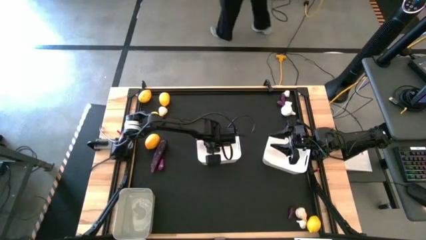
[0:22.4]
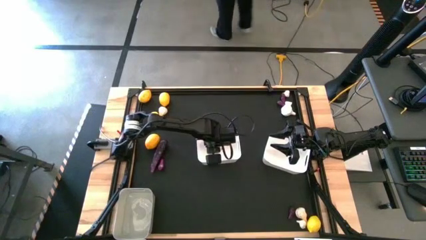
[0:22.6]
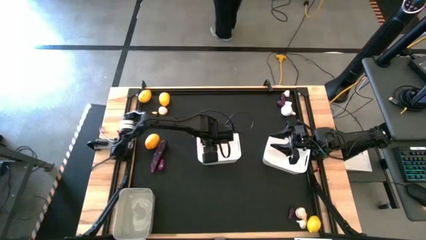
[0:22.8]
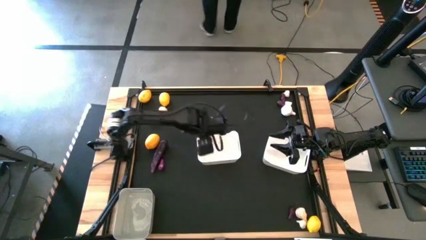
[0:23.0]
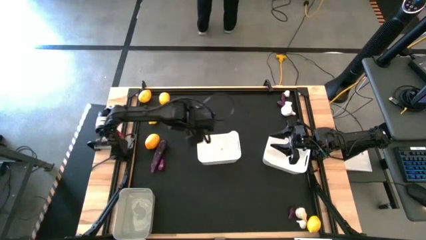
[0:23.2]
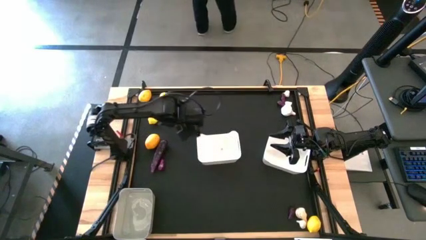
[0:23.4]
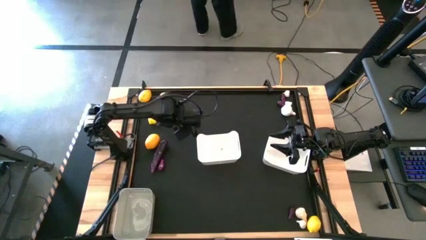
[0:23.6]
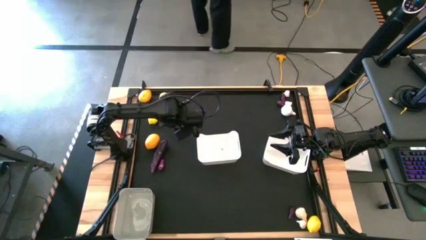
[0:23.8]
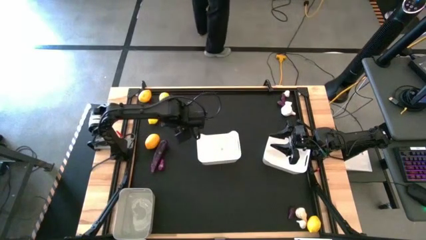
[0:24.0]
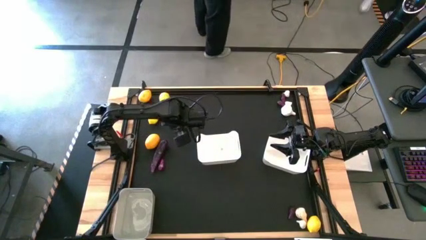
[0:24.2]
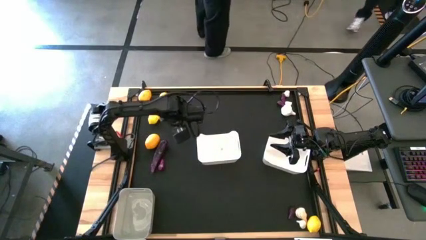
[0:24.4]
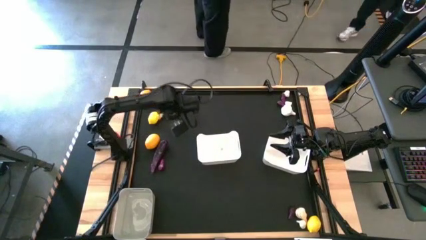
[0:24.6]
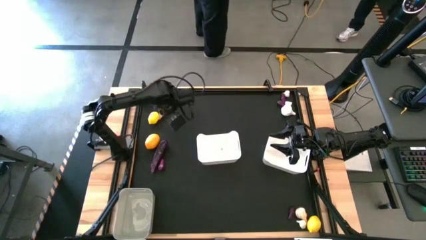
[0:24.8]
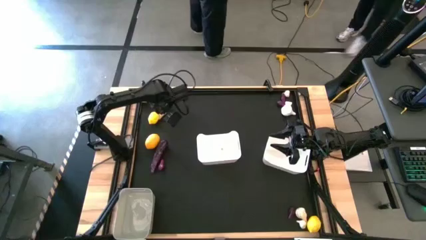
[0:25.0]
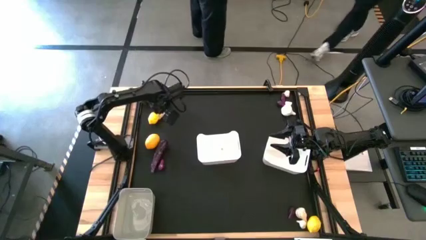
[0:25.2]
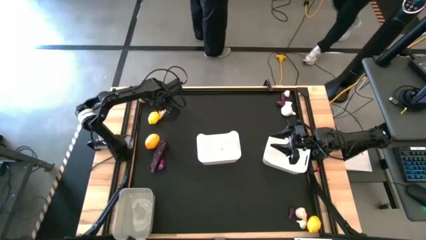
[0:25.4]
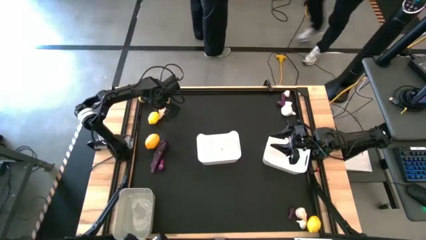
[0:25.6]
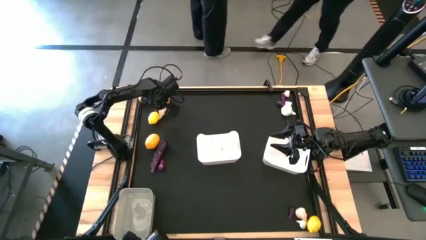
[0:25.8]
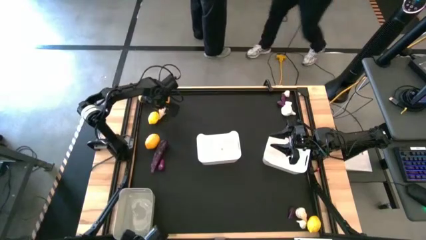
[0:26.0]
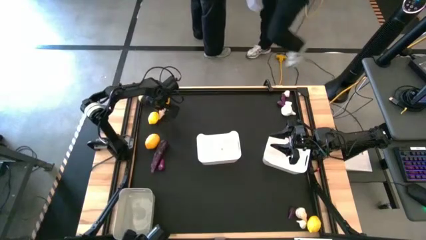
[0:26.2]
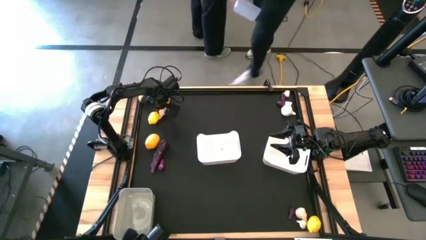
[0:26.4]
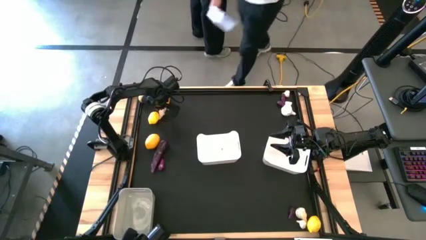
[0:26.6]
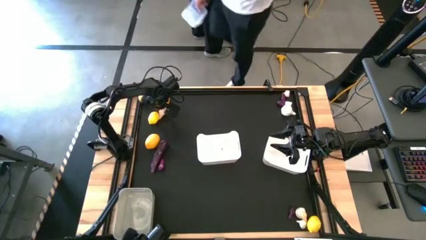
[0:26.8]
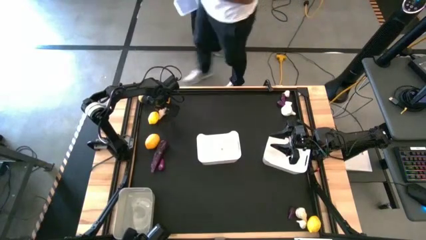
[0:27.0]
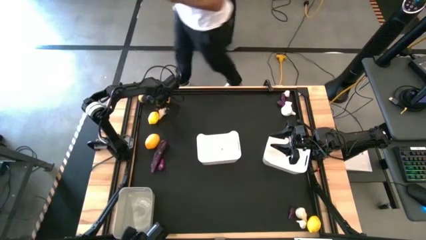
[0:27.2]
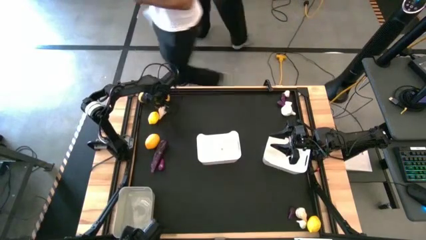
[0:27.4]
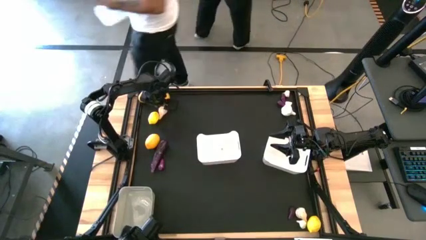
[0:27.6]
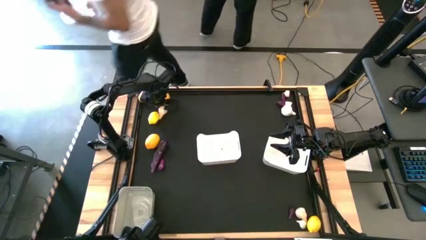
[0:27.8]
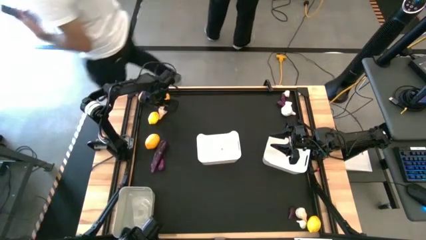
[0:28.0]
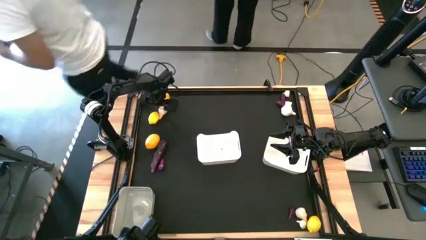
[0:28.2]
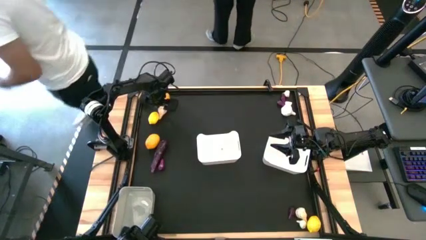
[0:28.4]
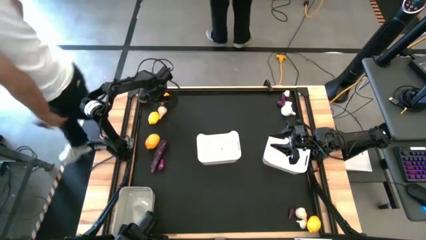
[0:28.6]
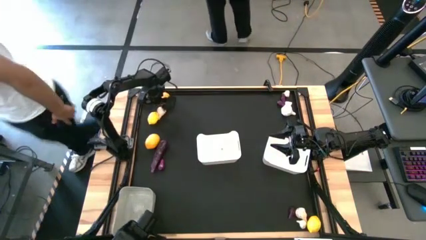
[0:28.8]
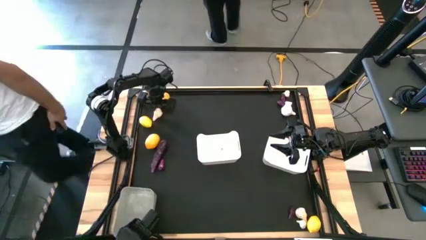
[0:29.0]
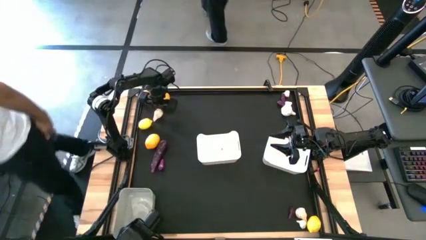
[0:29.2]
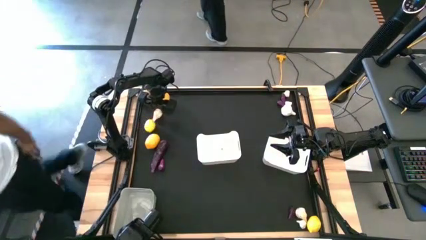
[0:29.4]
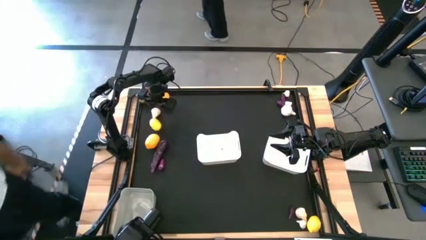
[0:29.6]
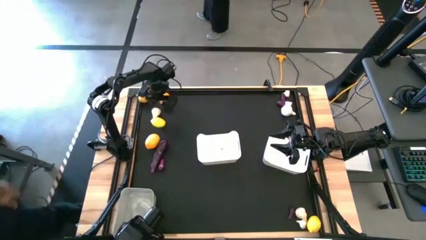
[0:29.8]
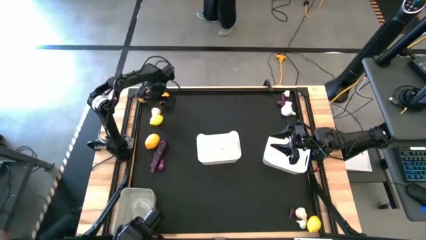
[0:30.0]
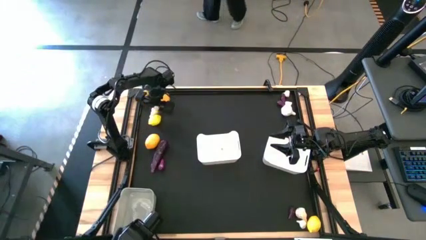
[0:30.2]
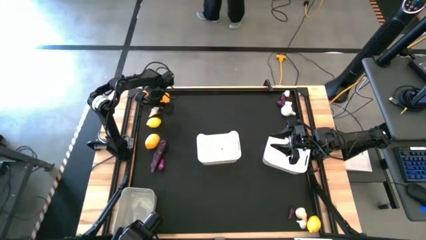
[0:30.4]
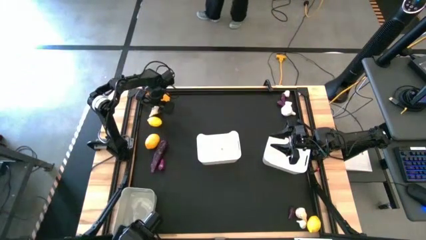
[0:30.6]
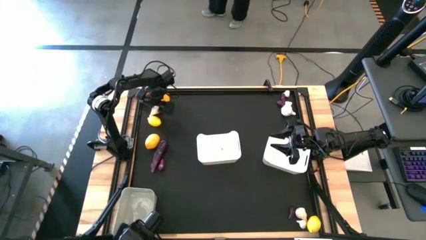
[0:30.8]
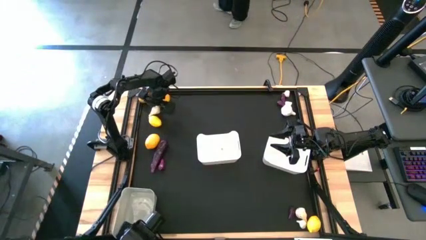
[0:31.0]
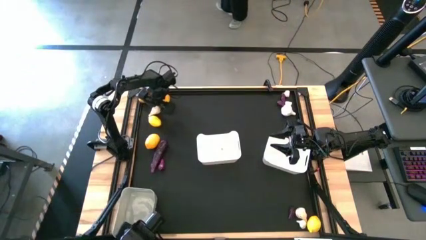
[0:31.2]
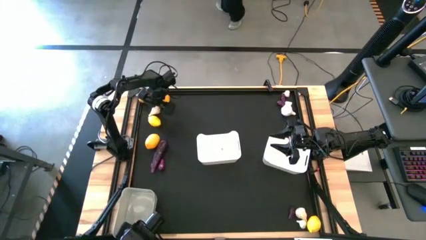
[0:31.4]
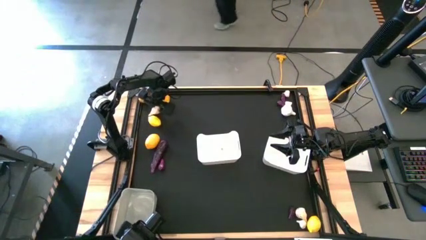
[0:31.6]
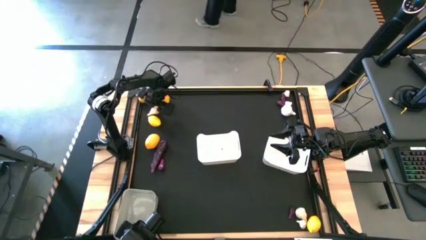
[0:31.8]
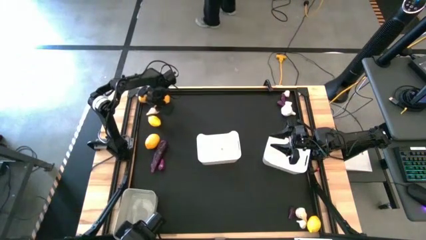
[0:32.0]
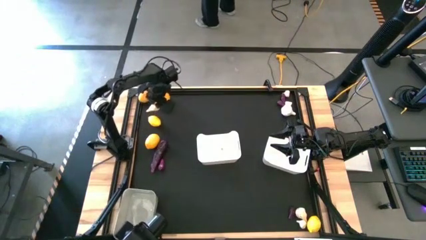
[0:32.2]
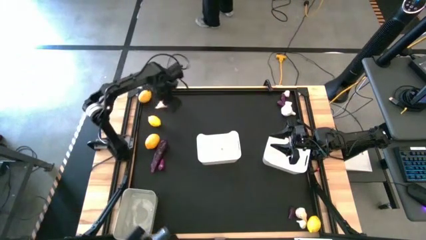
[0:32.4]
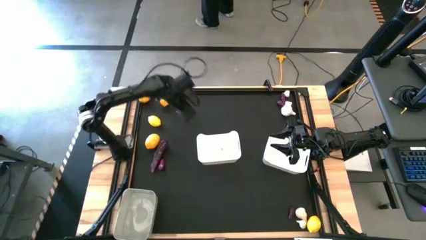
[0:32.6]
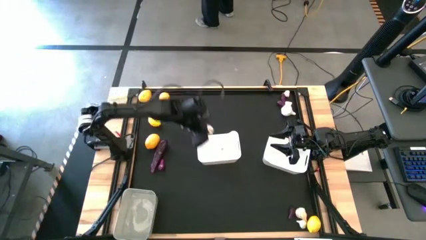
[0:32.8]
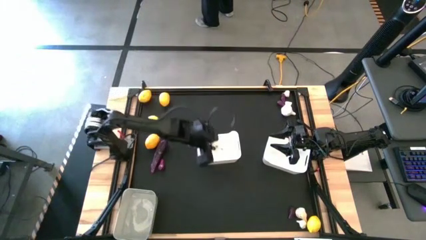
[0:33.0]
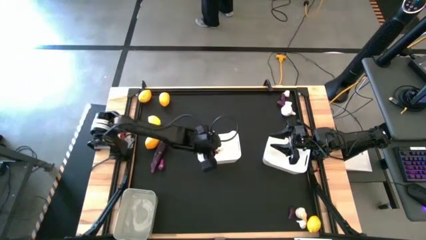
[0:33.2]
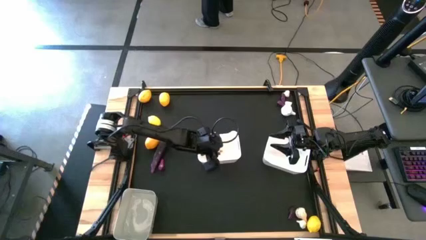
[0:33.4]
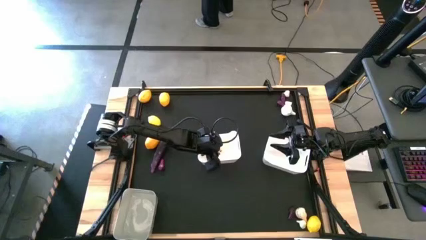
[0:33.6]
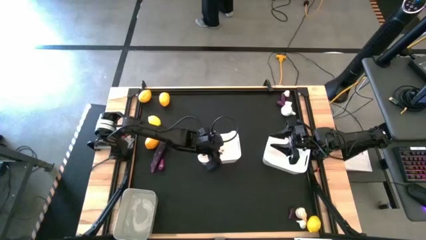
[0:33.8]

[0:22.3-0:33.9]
Task: Sort produce into baskets
Put the garlic into the left white bin

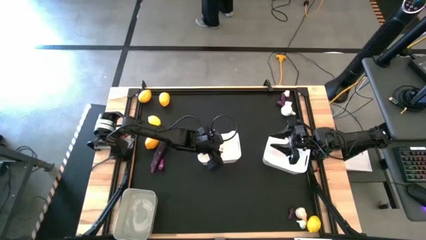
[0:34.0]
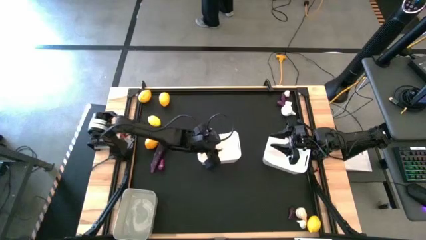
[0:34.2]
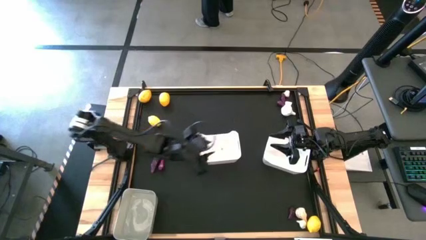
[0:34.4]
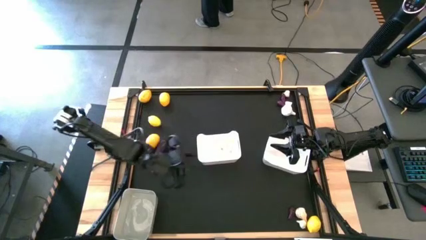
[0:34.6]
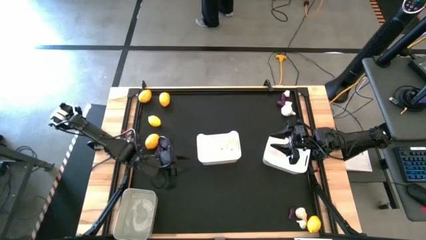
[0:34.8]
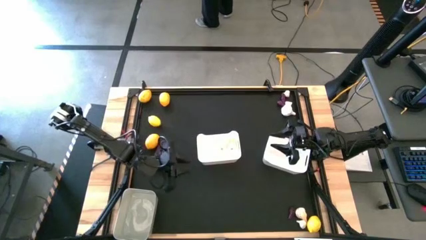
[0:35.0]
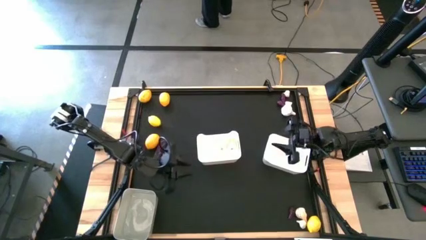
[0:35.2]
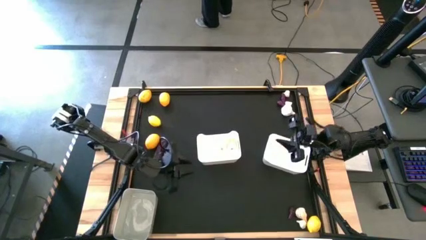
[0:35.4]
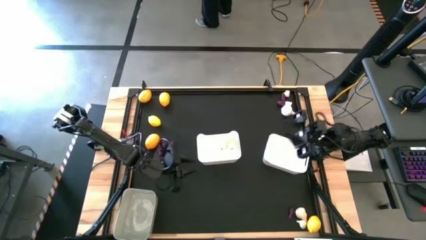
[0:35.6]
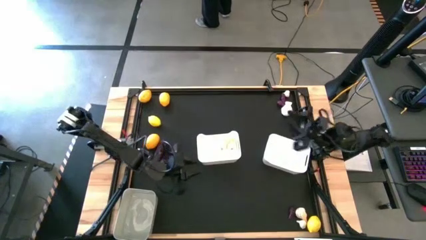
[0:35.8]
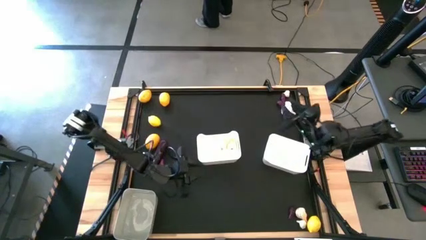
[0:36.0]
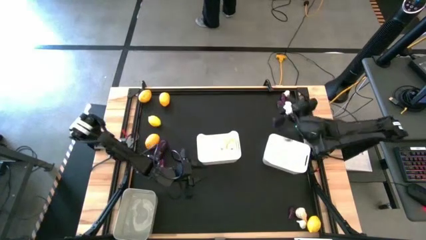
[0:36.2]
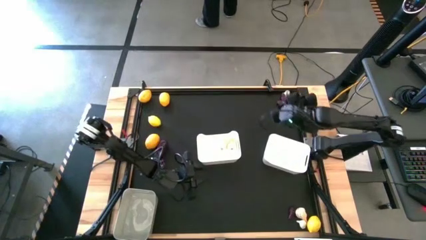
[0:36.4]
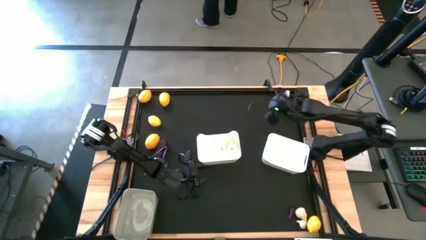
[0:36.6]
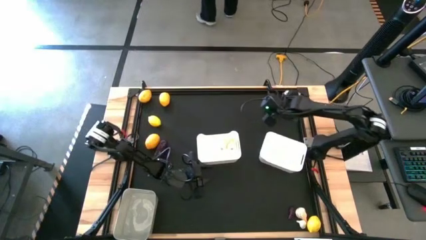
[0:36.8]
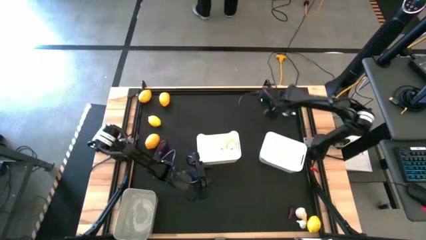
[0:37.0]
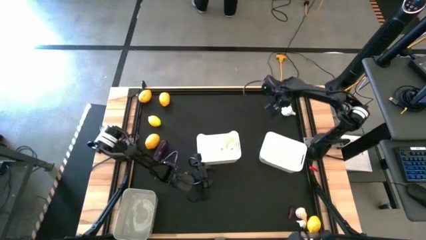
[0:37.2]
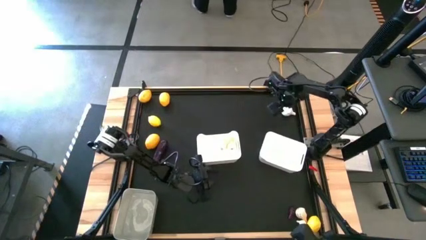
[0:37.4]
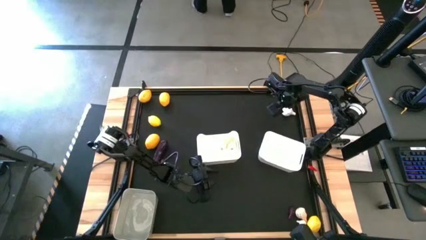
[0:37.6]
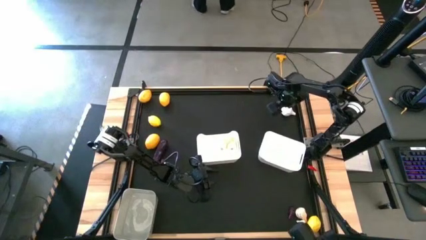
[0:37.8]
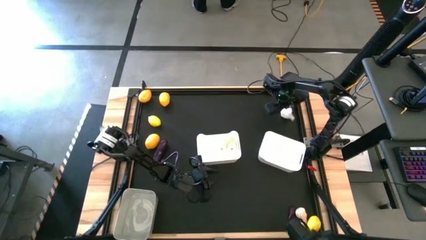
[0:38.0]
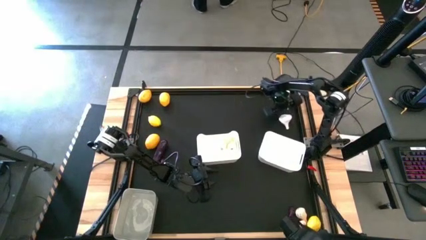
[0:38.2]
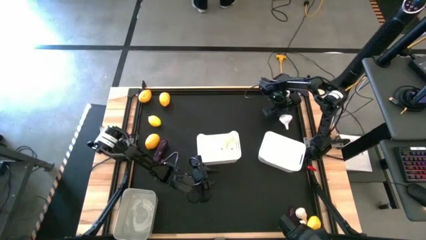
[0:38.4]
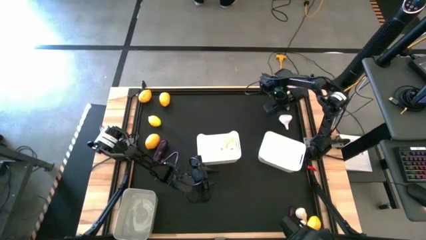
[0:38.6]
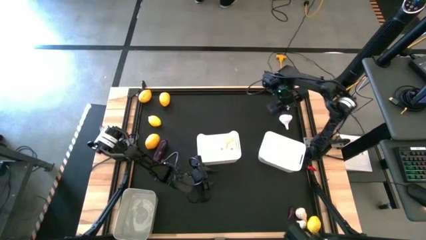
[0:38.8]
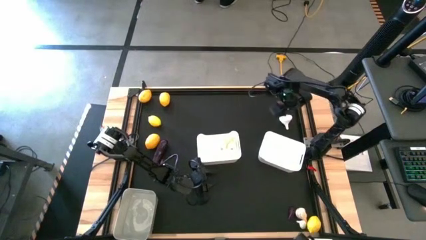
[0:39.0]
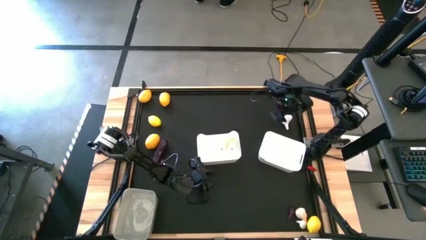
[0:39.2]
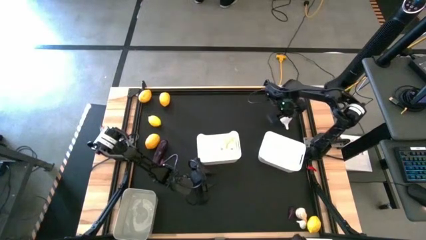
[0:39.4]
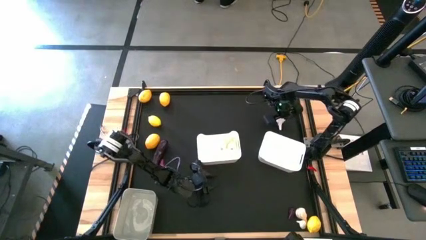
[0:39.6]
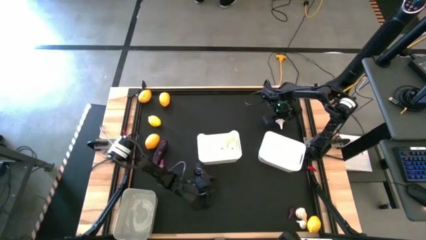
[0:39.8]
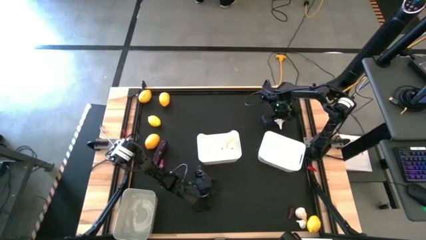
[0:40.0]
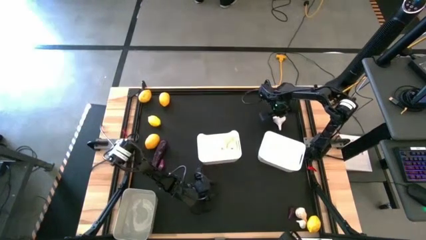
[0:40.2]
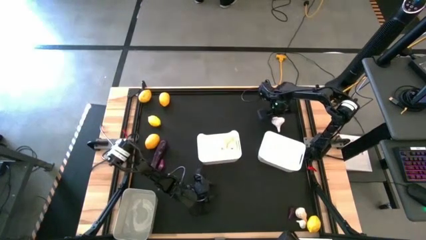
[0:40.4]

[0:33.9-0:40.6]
Put the garlic into the left white bin
